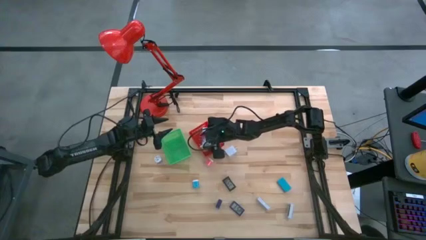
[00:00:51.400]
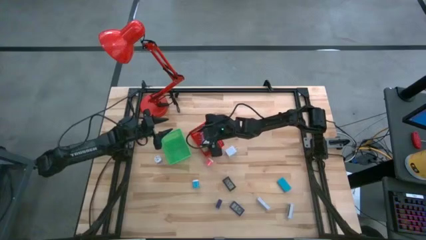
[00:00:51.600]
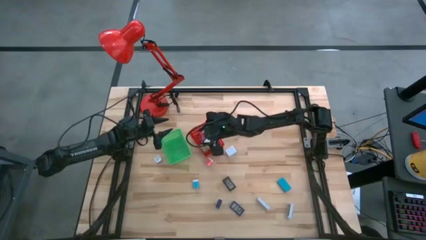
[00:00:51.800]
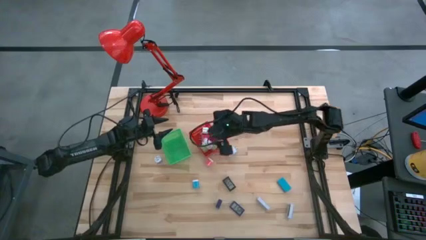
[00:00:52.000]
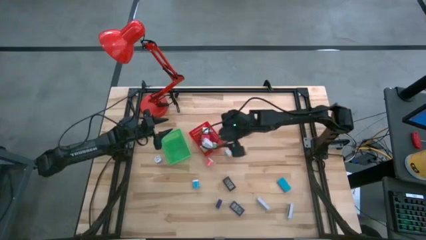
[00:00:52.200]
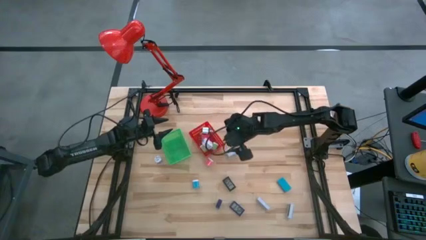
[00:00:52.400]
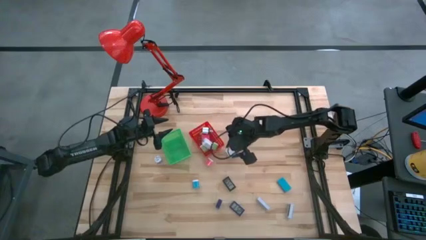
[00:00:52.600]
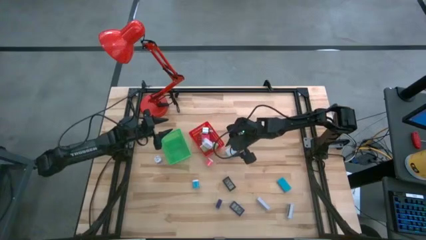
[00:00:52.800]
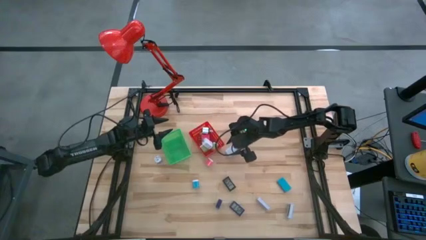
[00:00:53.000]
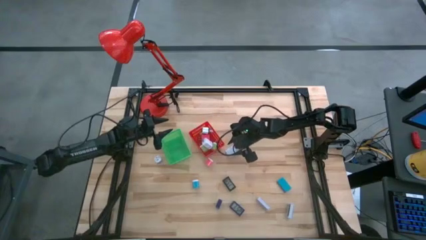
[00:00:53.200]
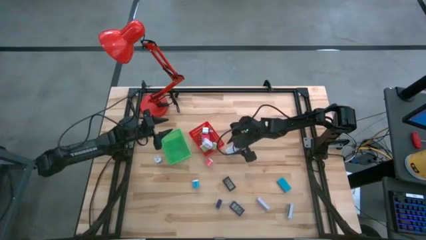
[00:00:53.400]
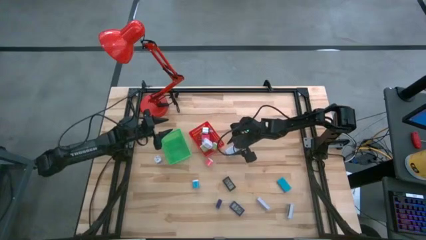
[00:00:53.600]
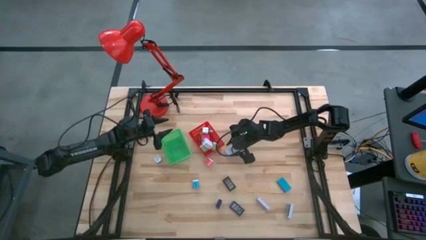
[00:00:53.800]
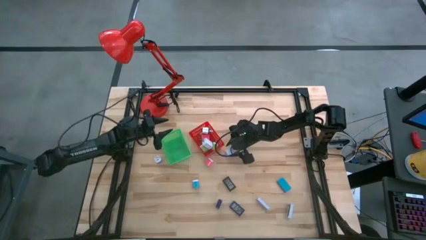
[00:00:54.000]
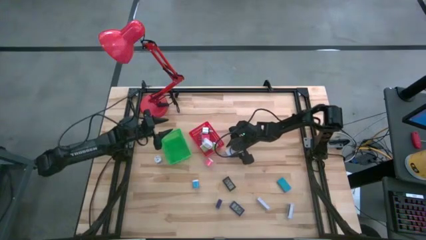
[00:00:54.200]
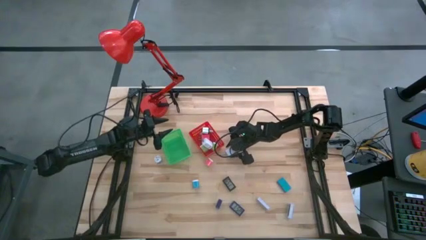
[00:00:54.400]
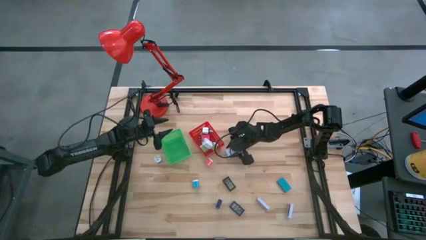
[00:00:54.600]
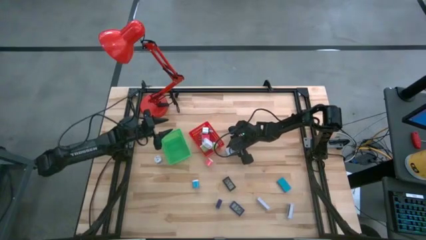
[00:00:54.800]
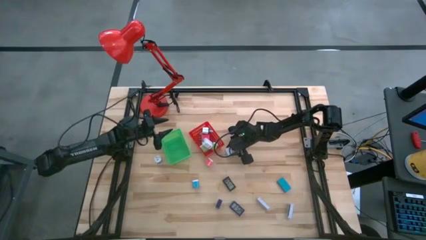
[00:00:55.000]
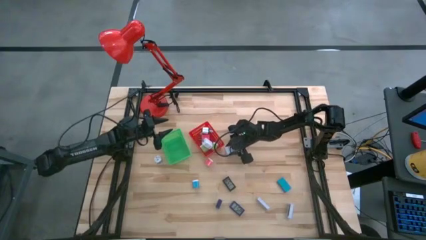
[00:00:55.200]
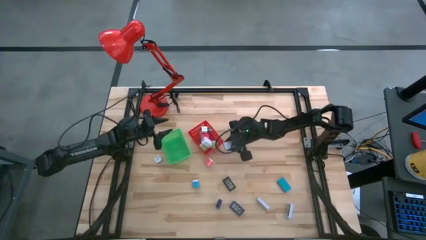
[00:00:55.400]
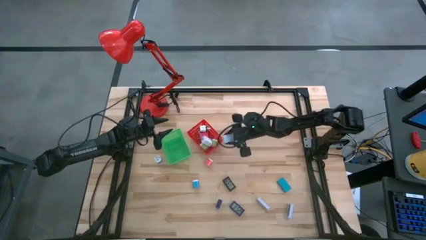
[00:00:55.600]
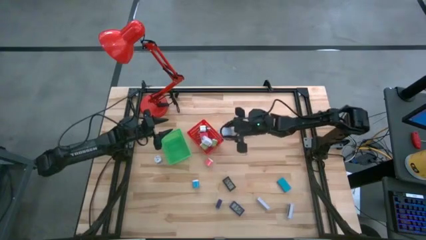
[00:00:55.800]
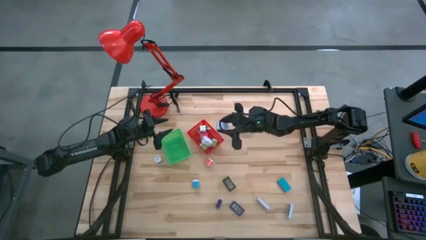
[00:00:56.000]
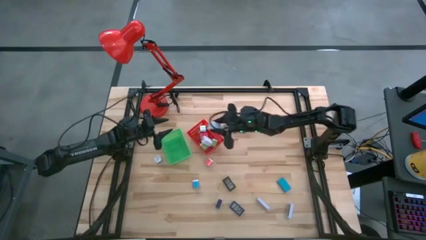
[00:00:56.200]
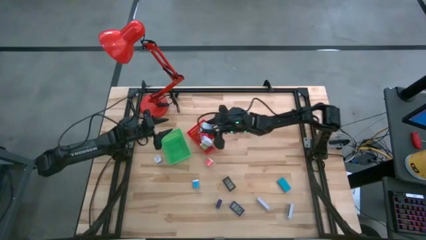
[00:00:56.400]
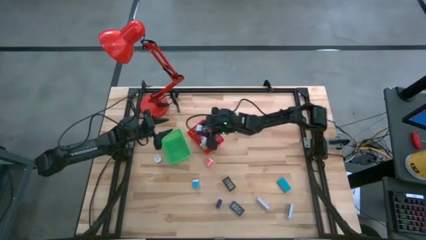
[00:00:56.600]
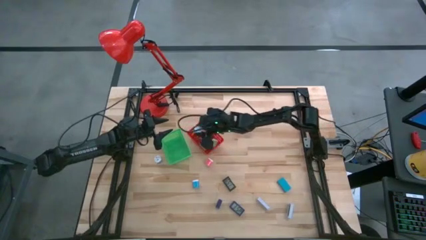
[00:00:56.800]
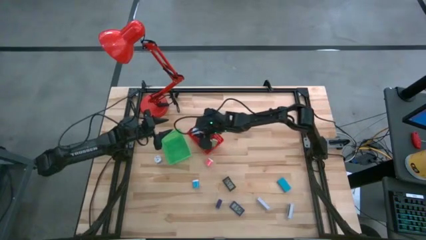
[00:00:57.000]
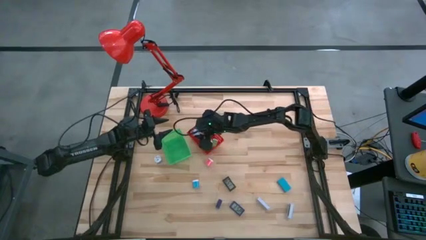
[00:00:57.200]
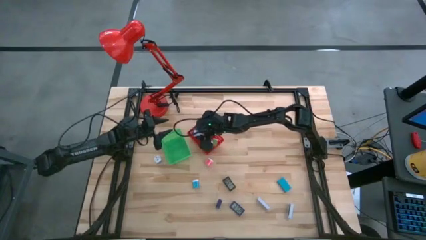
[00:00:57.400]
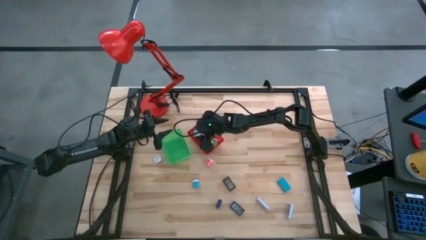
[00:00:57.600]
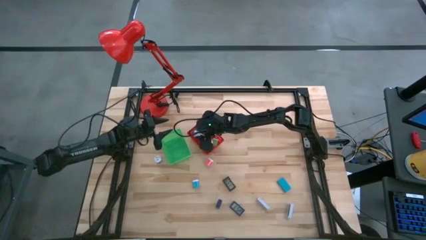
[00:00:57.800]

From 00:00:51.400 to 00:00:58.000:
Task: Pick & Place Office items
Put the white charger adapter into the red bin

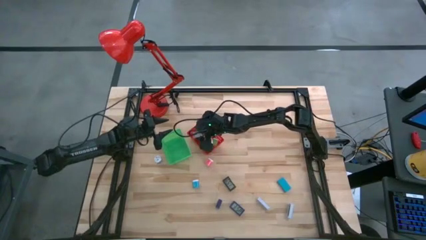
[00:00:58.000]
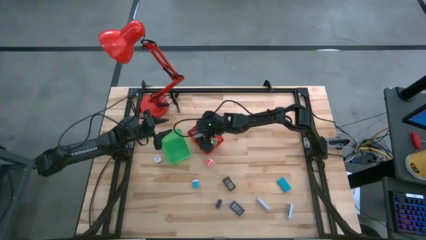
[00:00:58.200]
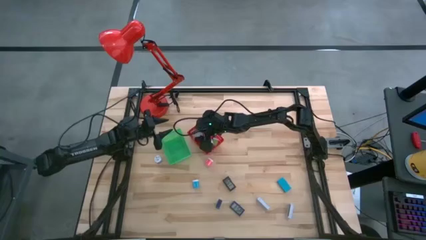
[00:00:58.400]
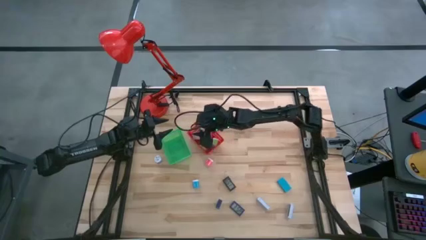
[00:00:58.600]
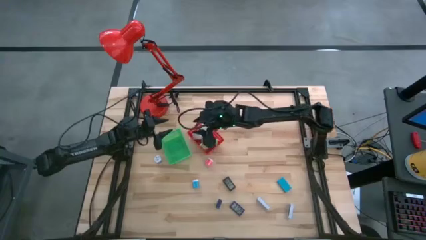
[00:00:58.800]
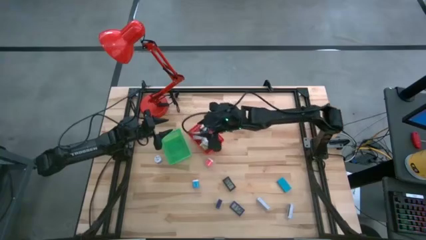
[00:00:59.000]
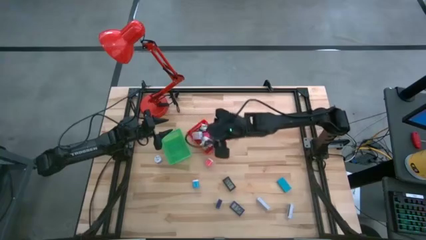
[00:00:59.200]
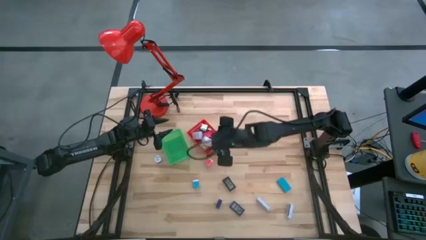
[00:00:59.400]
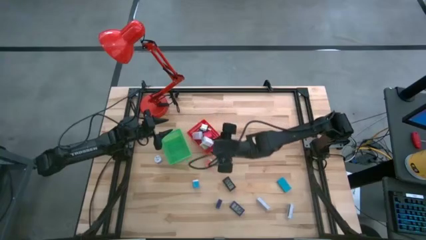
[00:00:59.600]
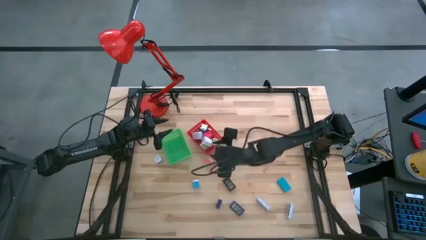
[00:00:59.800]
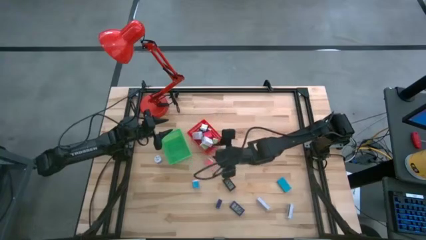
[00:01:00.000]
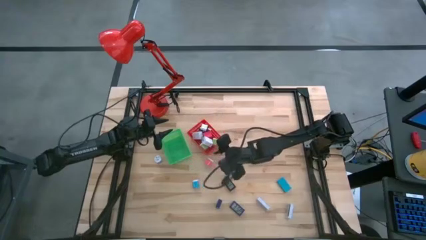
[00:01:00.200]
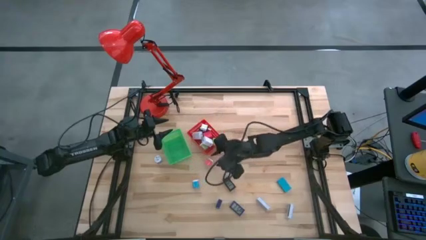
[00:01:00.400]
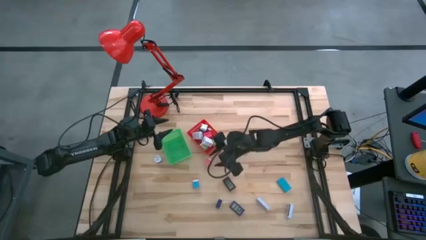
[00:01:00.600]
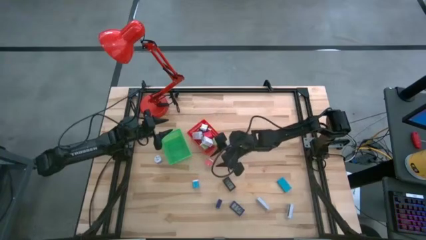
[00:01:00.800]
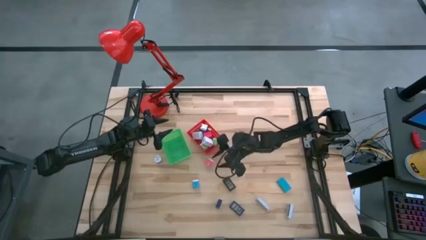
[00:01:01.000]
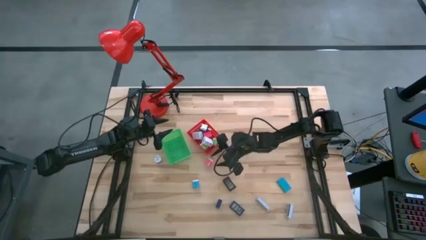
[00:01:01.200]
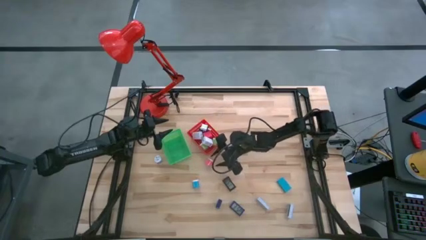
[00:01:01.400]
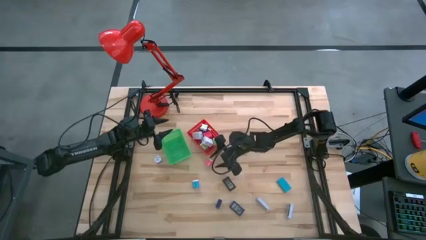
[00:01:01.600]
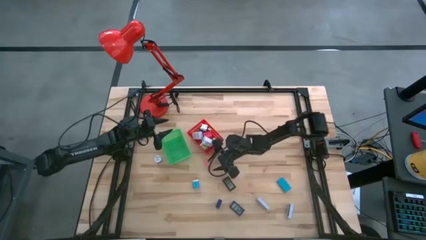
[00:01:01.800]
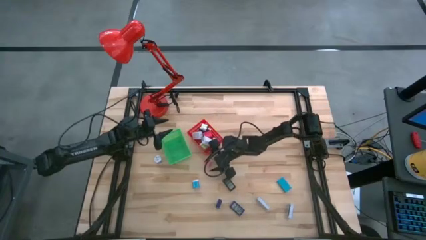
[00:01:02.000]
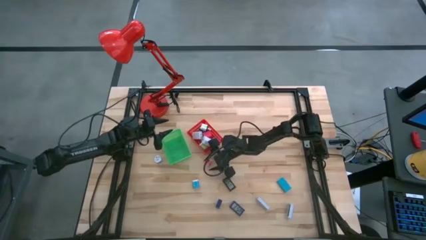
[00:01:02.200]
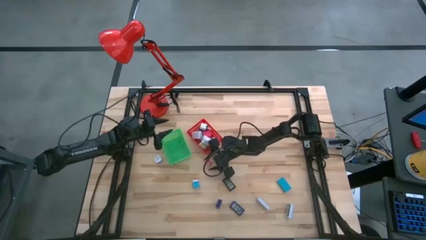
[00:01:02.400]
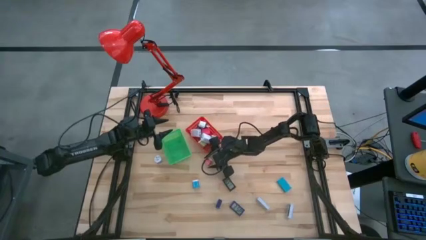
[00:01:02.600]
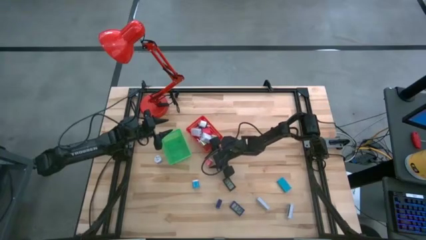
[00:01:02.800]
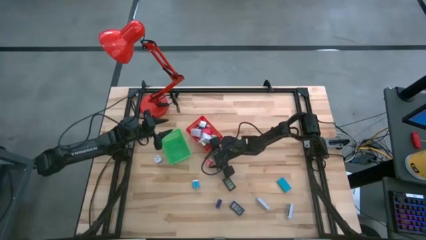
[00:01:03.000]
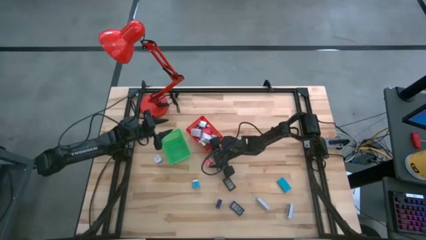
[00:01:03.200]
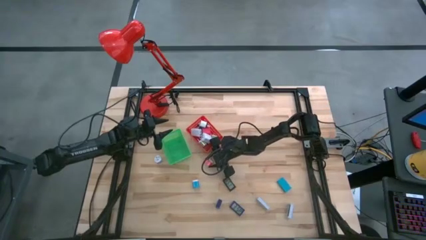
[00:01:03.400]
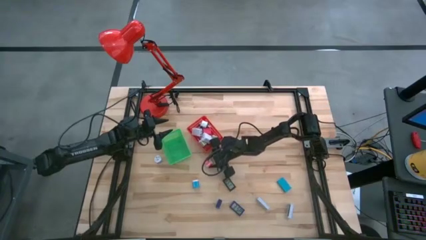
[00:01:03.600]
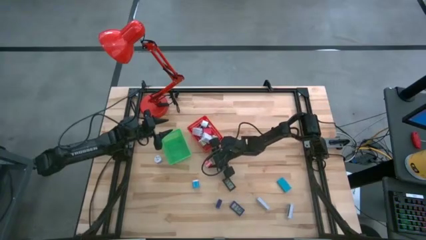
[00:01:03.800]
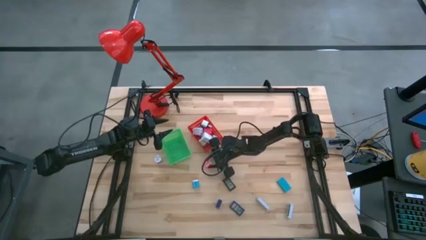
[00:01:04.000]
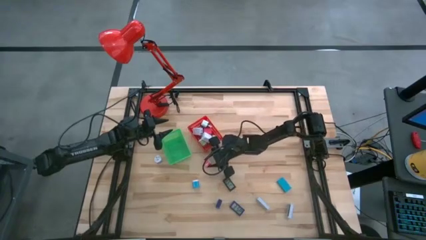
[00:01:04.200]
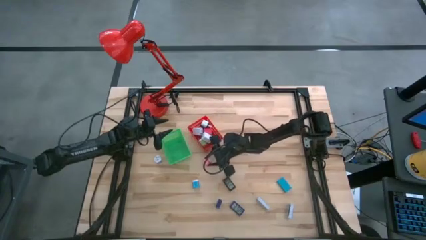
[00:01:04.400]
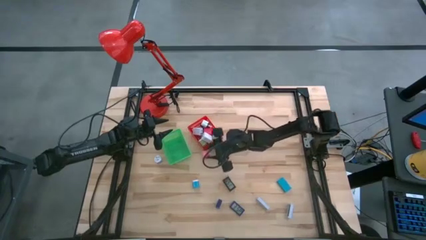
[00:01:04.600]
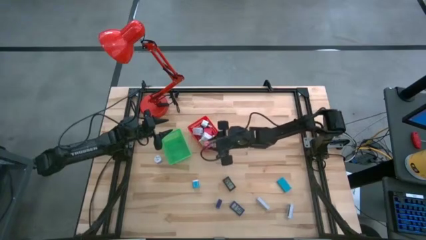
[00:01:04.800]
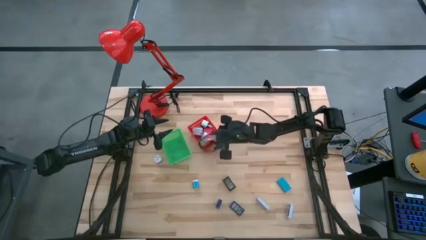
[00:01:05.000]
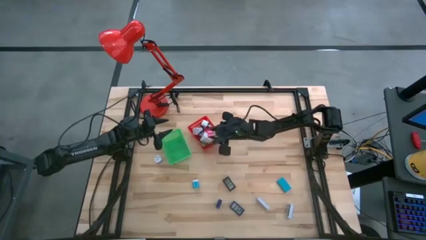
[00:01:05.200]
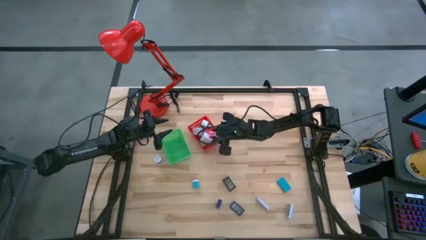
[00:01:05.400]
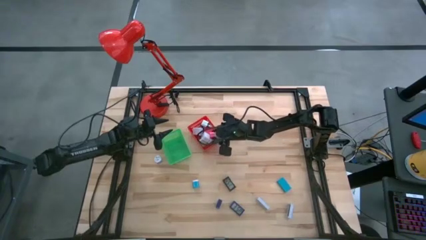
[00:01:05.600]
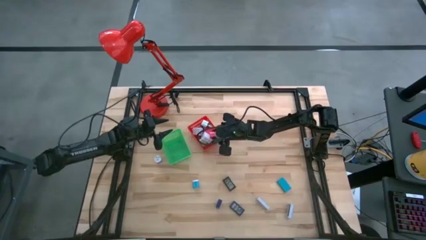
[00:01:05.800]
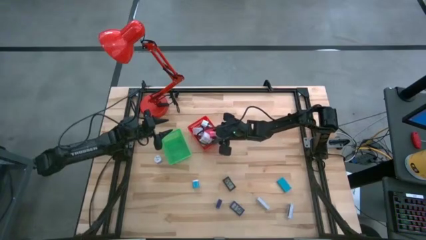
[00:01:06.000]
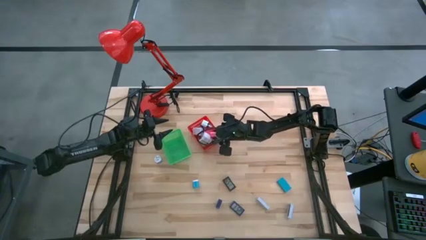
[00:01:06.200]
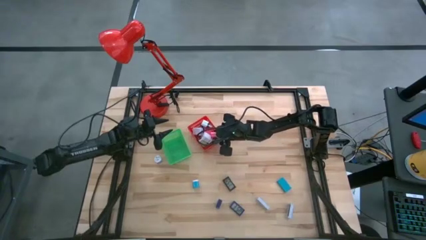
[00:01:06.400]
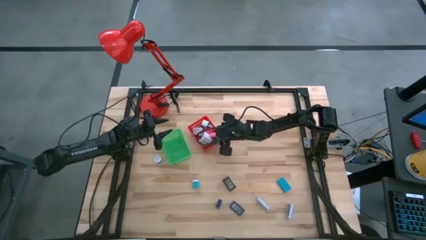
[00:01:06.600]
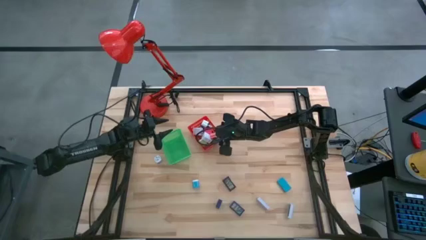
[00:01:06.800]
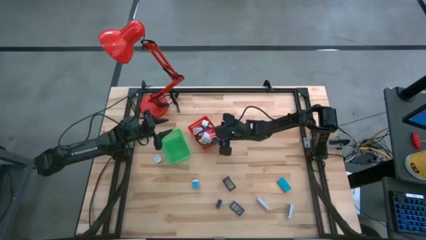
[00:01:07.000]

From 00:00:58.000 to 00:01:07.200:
Put the bottom pink charger adapter into the red bin
